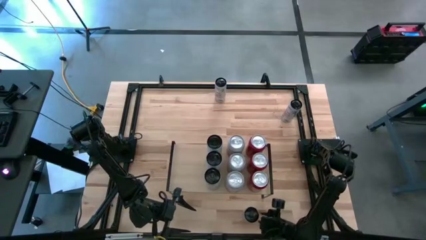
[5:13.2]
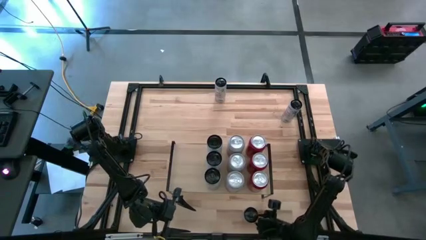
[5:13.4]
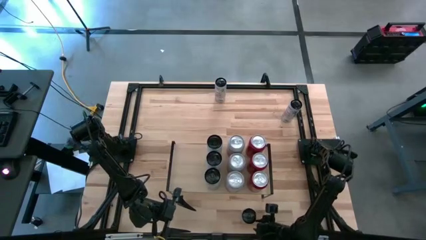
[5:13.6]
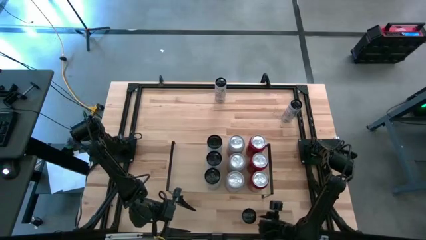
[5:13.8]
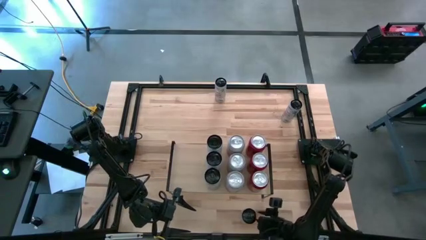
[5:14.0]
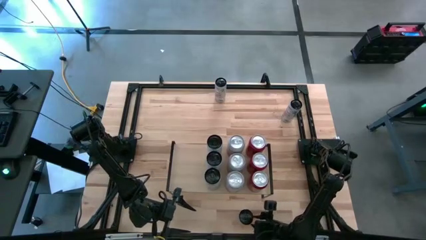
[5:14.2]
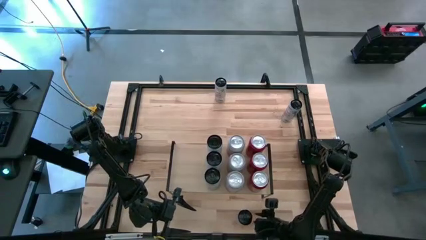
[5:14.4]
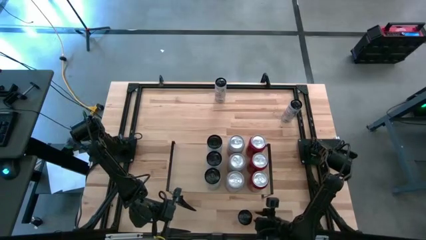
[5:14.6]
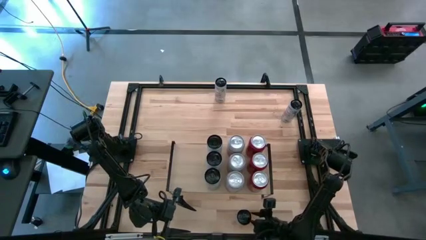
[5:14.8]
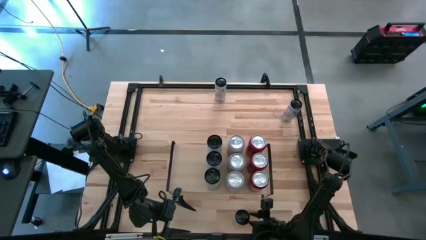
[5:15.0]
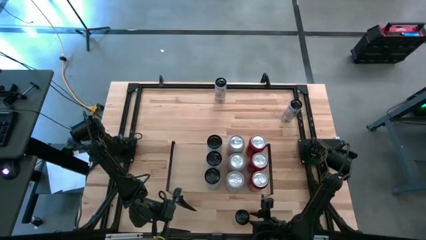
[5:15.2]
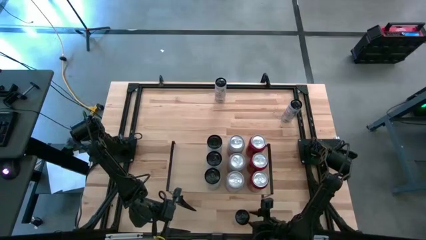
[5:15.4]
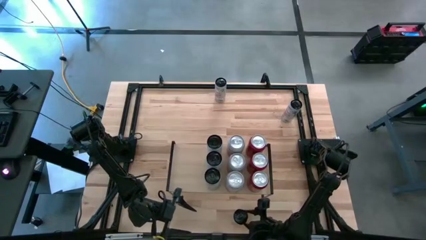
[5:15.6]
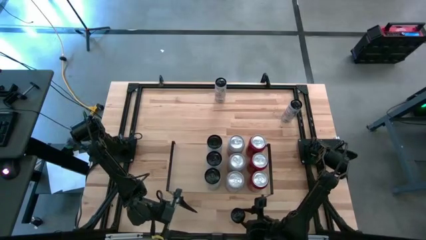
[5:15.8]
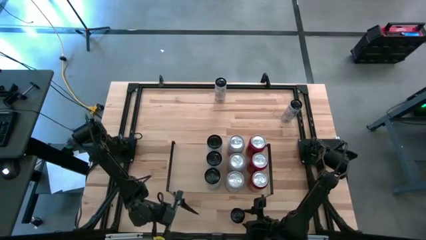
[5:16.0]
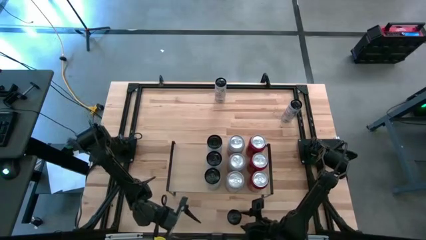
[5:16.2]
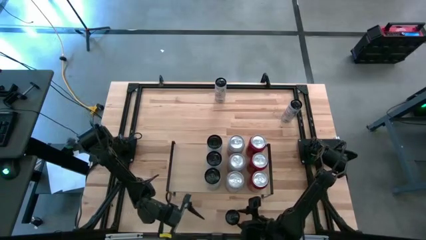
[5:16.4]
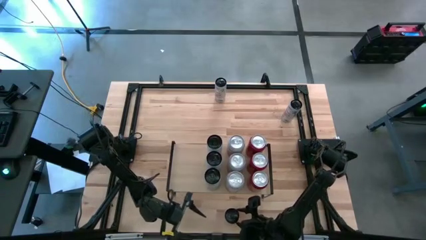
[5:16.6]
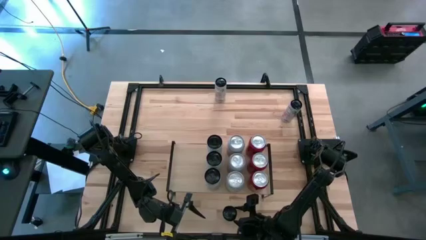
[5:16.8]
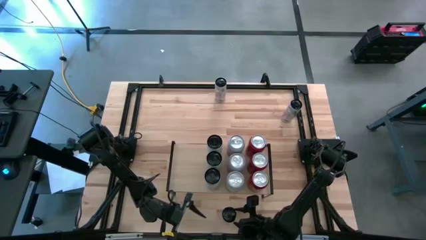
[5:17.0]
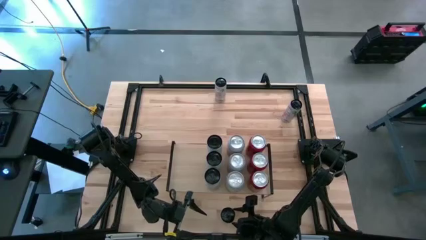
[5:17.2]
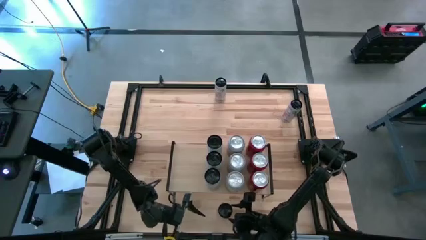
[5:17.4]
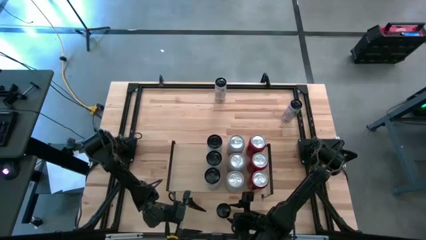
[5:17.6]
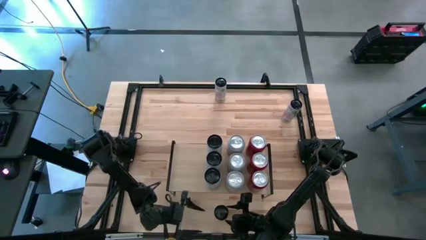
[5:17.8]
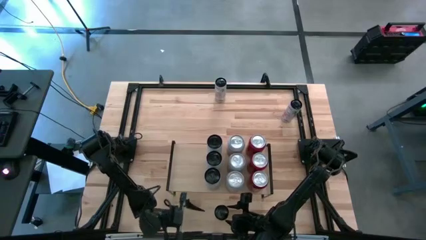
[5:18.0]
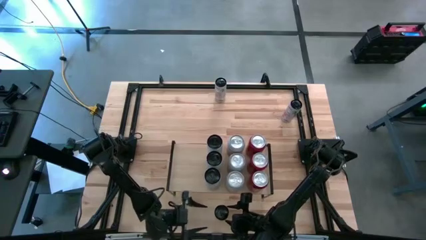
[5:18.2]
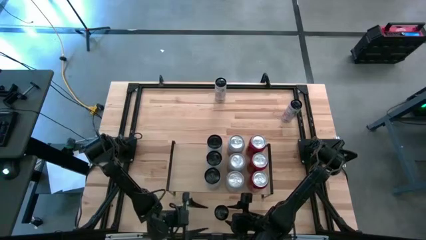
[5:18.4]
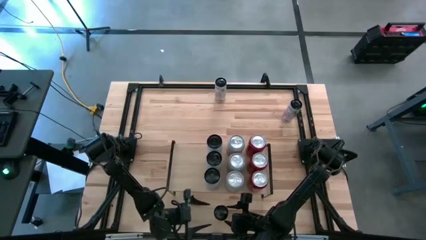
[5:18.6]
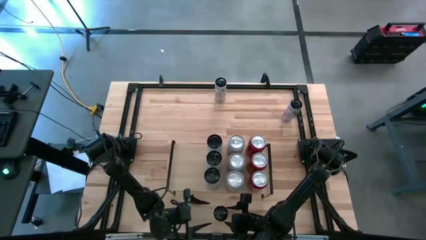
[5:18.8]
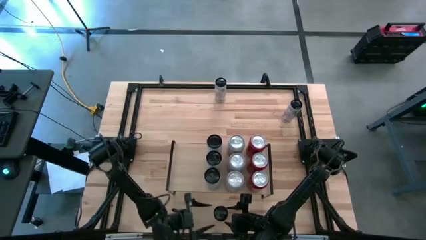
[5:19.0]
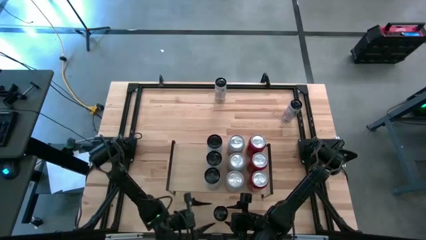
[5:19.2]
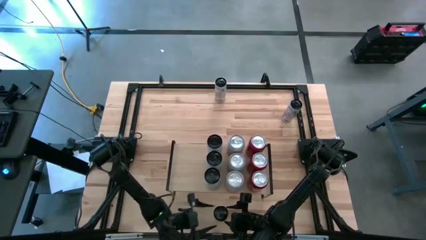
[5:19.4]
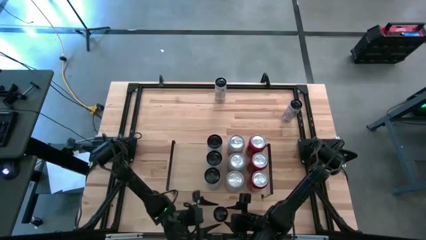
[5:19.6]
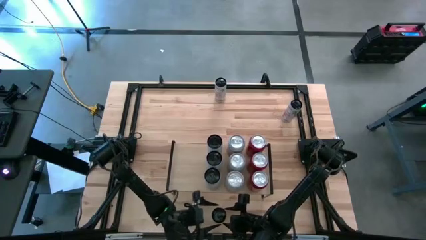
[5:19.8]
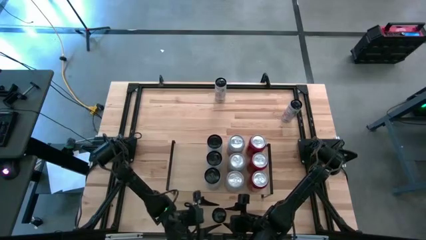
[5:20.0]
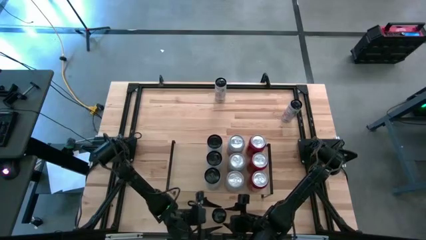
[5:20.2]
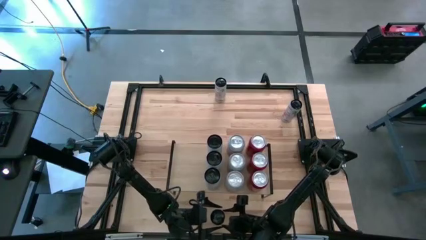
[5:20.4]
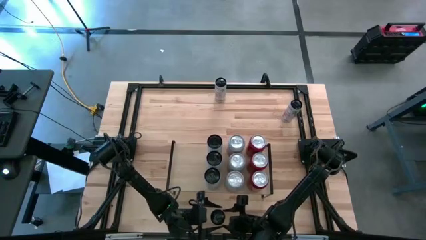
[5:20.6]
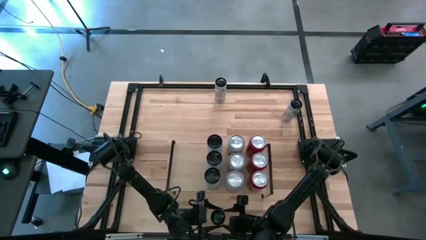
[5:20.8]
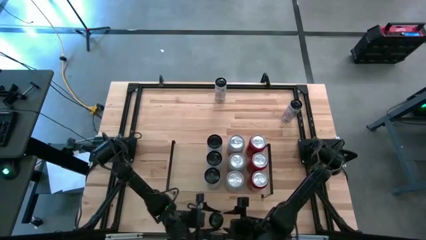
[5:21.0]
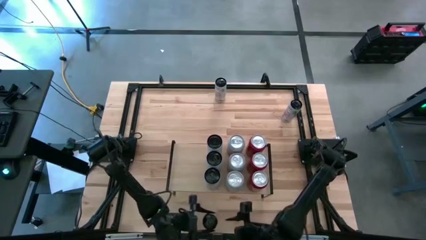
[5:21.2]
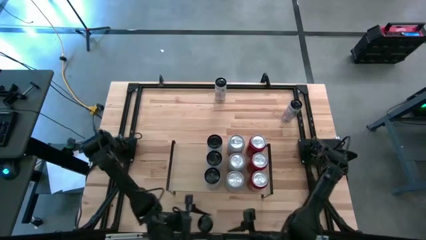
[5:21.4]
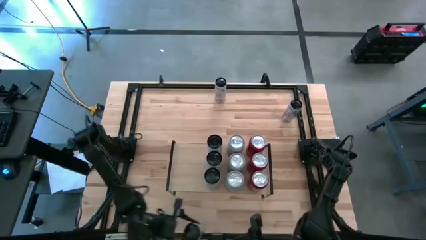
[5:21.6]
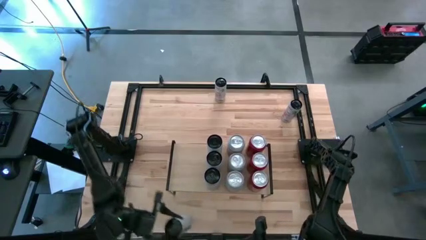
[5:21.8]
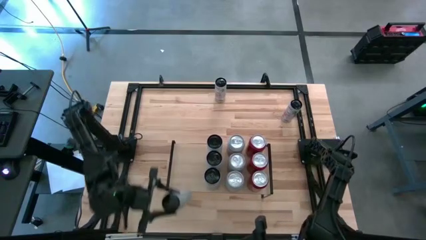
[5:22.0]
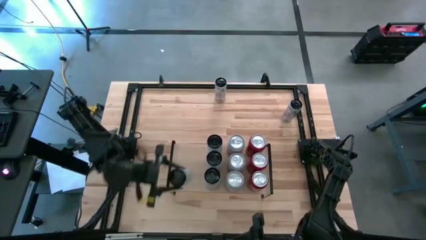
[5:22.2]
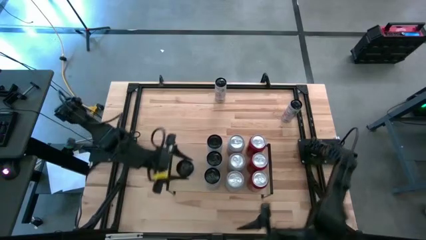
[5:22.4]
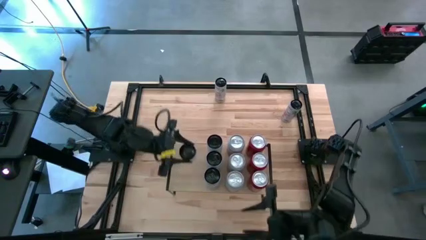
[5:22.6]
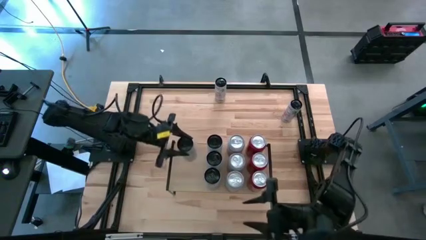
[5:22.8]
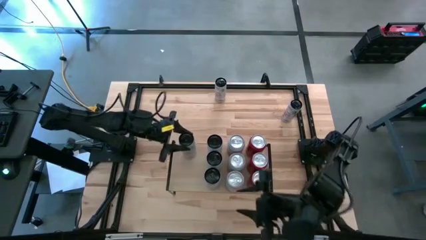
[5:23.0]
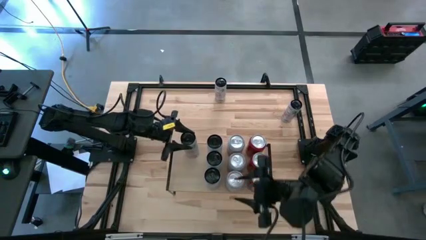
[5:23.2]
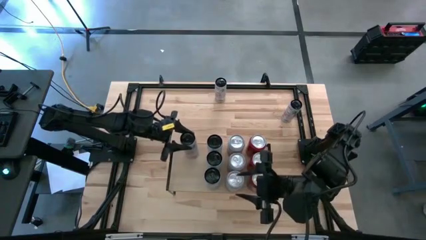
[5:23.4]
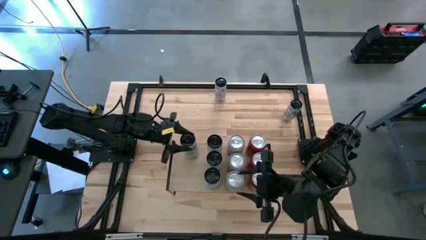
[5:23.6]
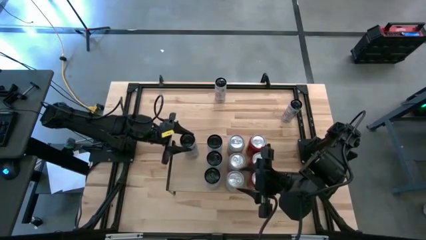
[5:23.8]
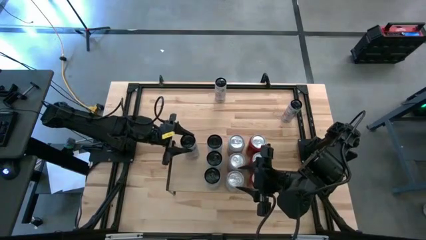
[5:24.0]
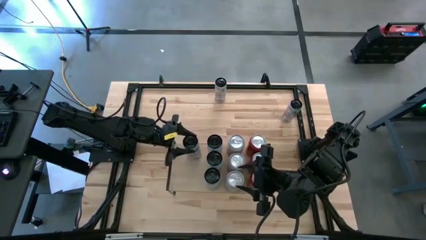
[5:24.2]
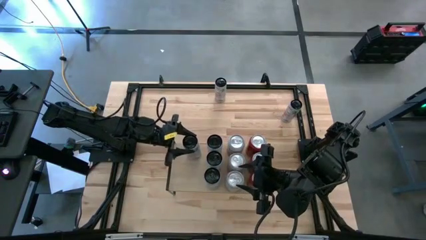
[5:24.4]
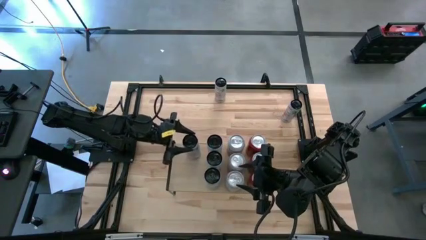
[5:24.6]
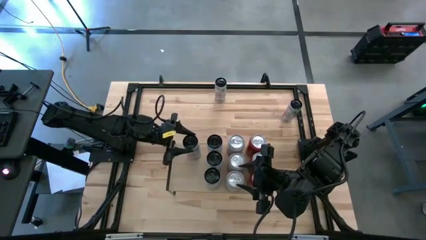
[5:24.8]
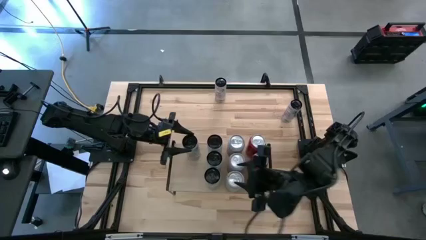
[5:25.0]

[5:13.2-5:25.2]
Task: Place canned beverage on shelf
Put the bottom white-pink soda can on the shelf
